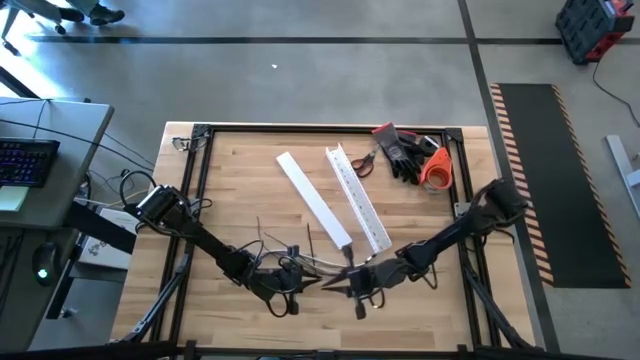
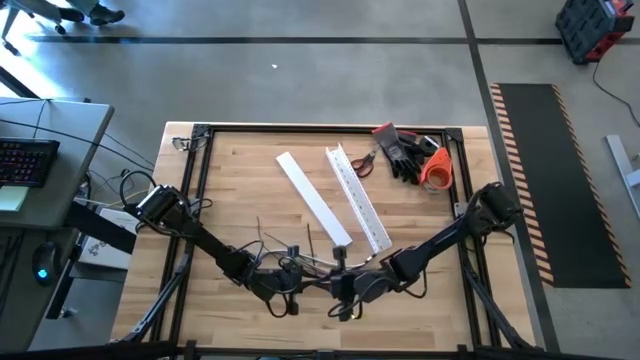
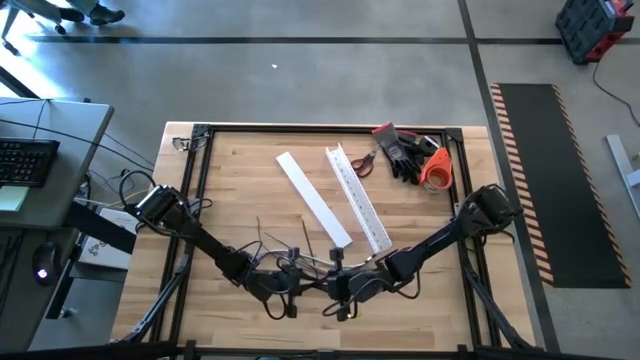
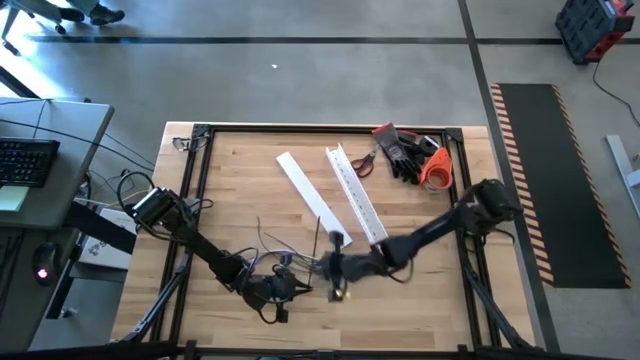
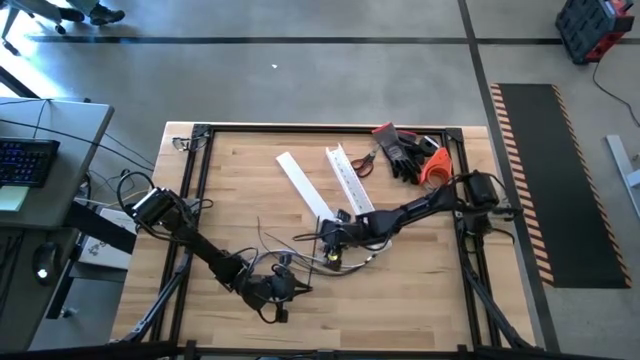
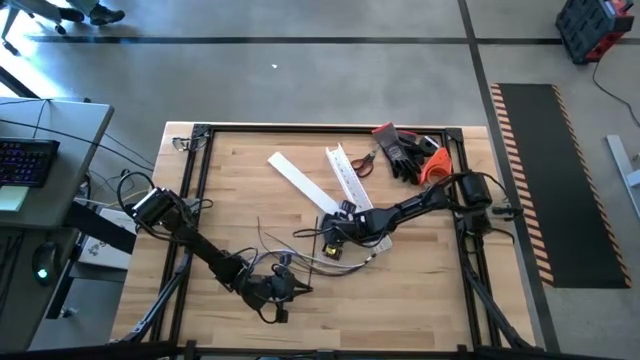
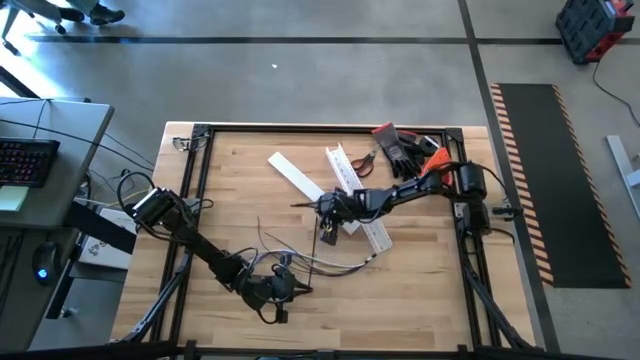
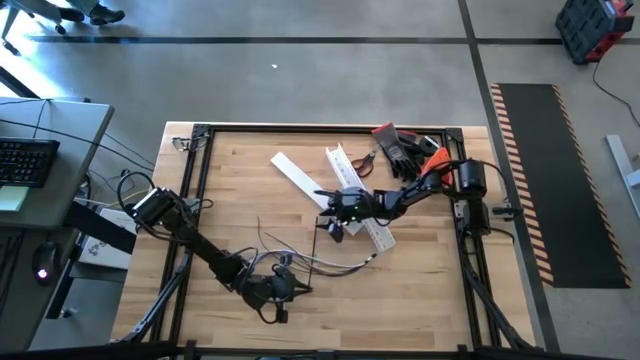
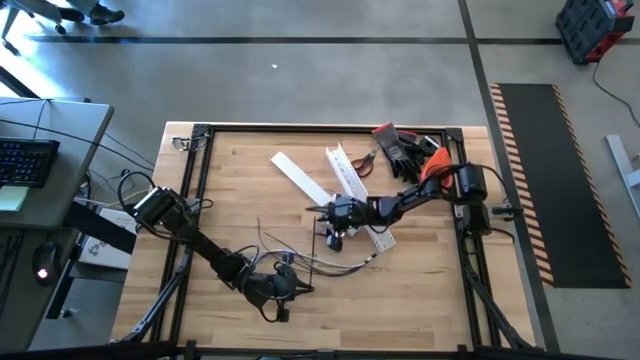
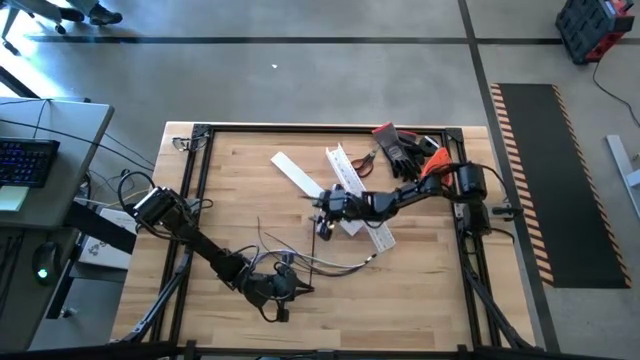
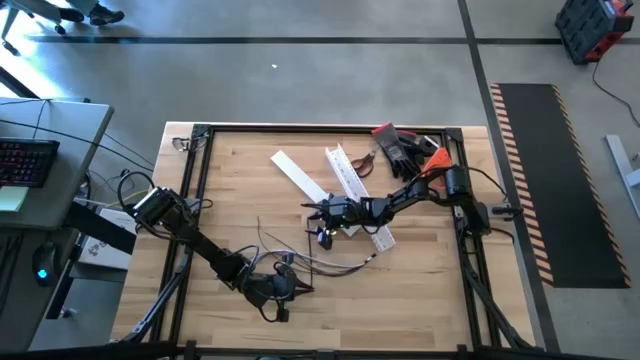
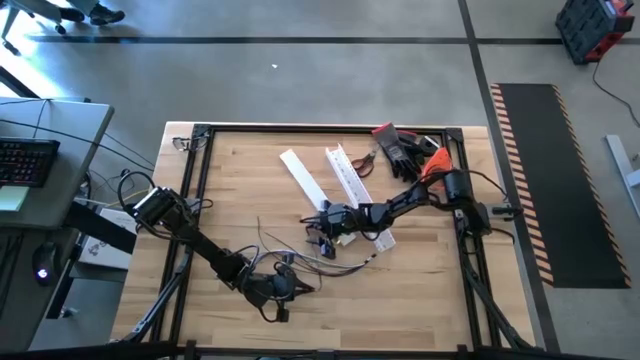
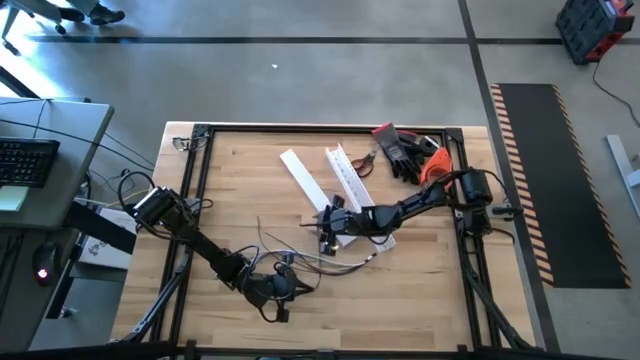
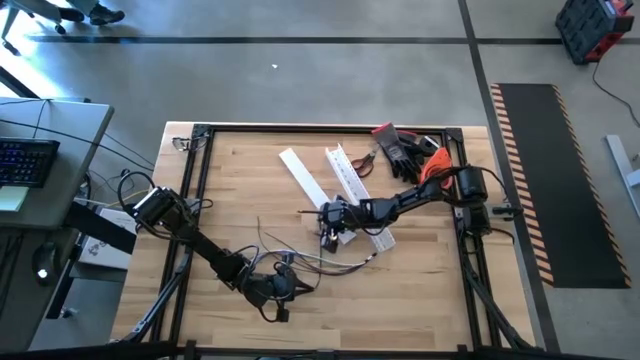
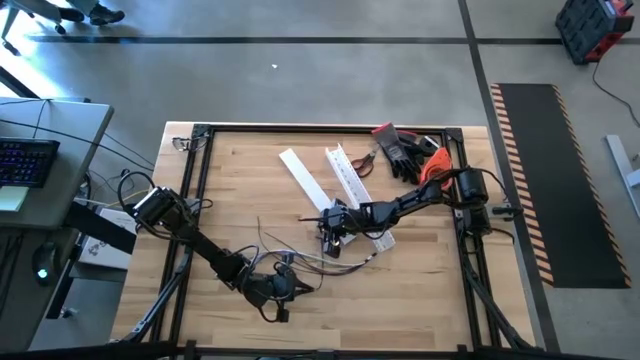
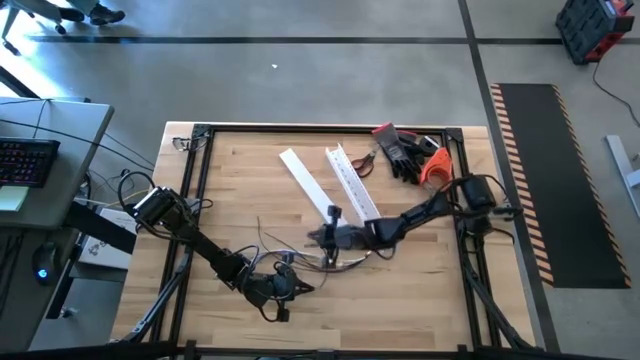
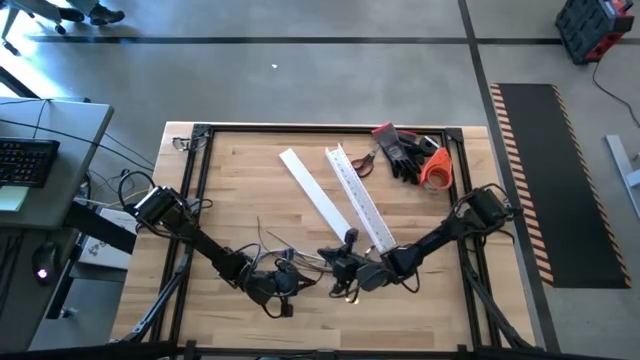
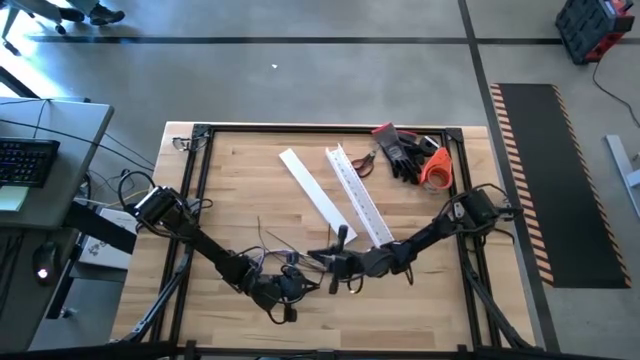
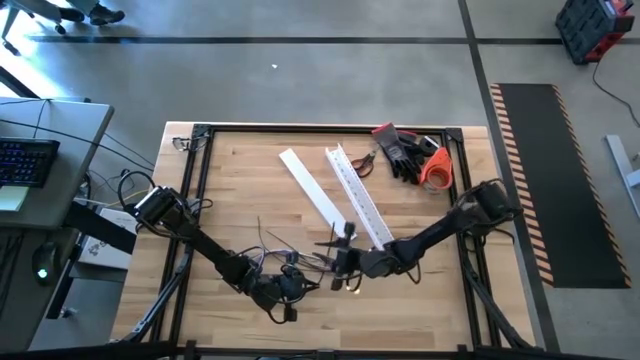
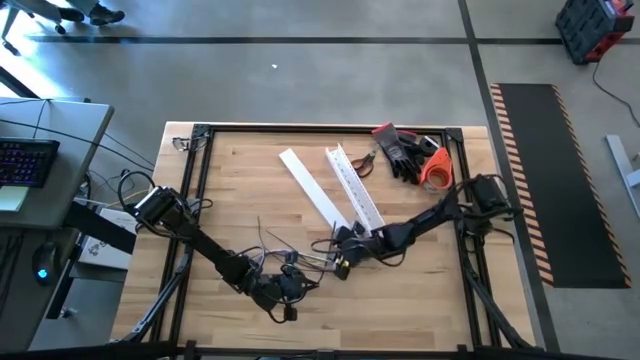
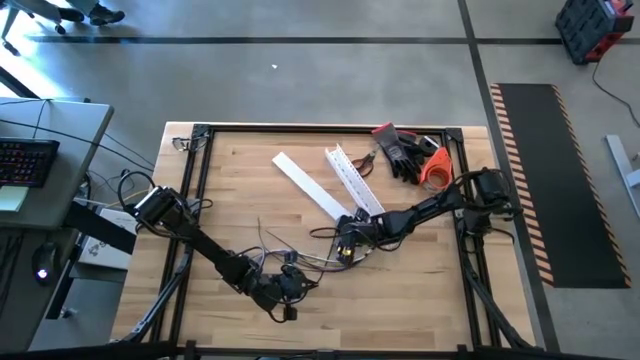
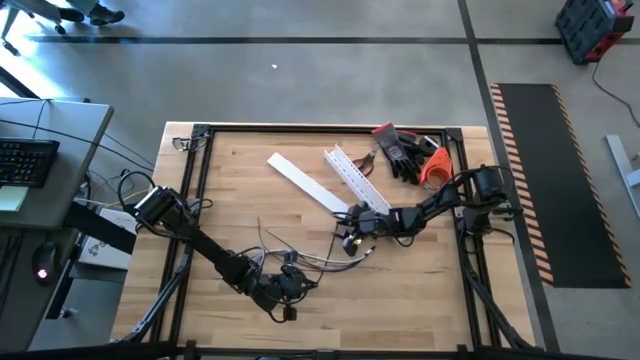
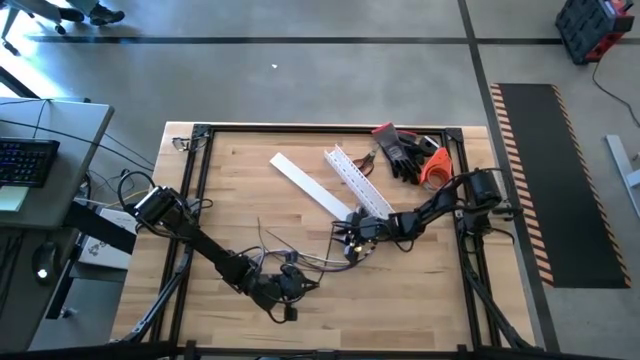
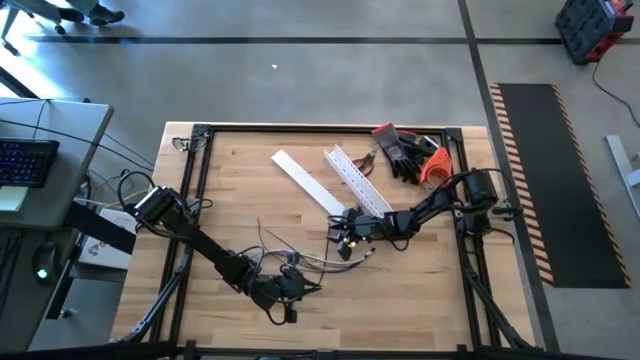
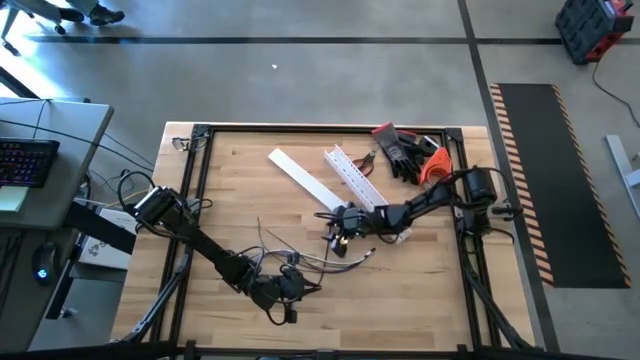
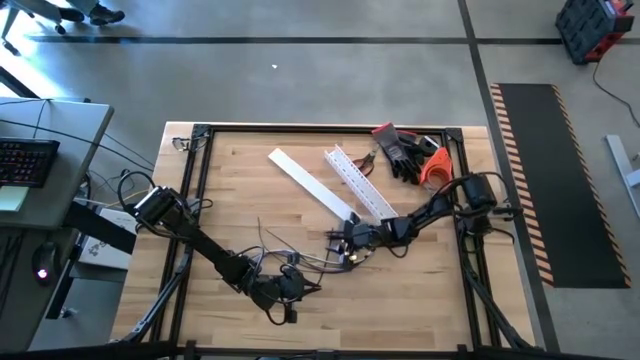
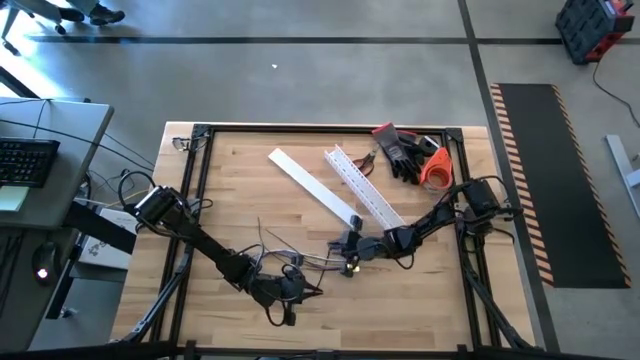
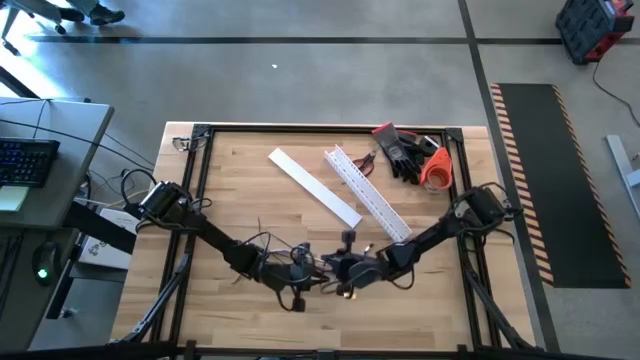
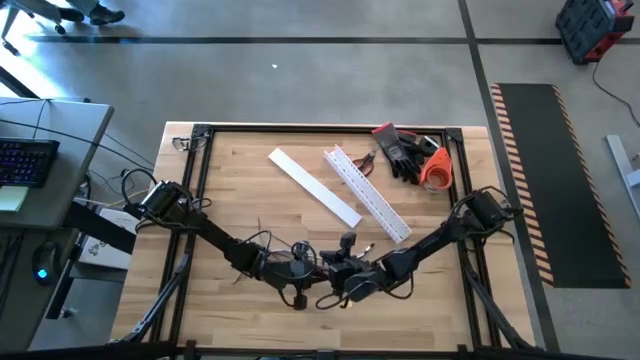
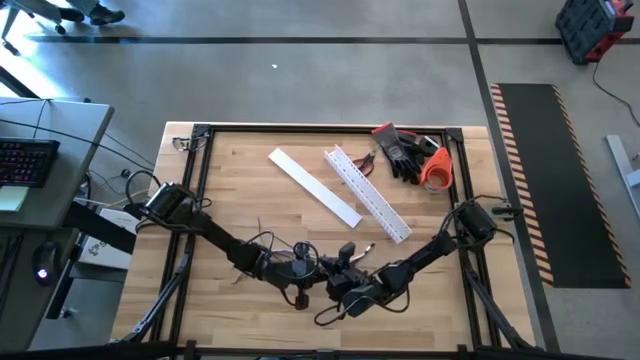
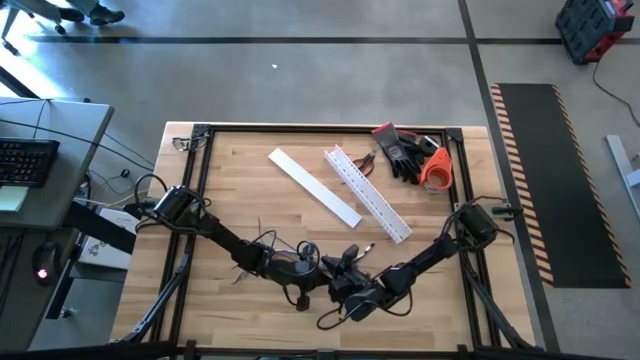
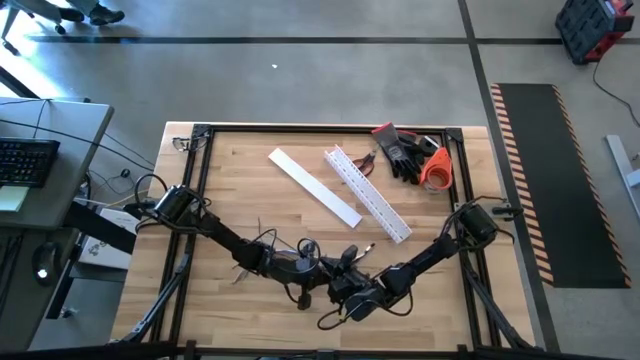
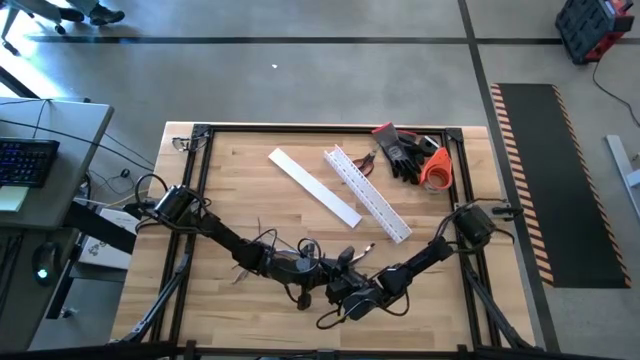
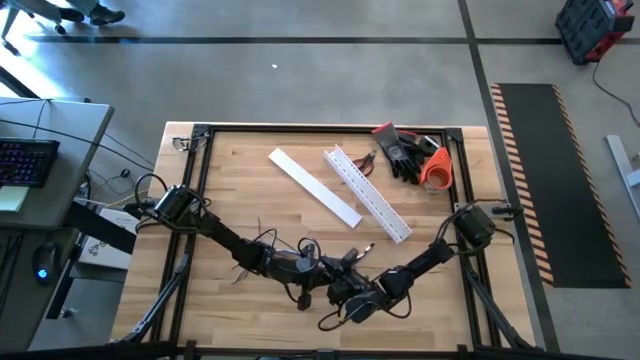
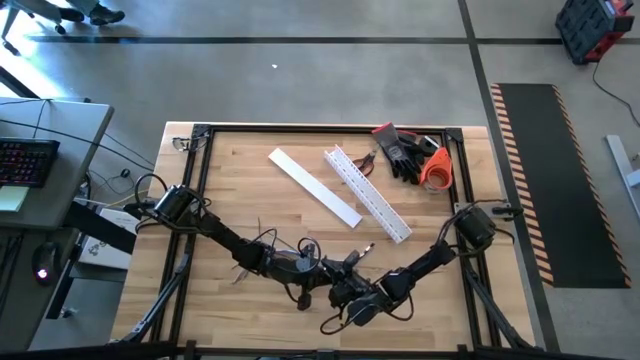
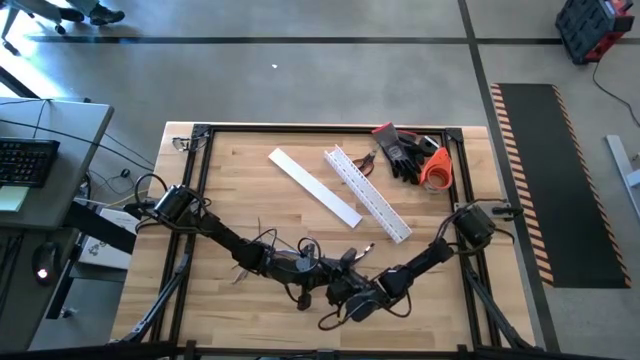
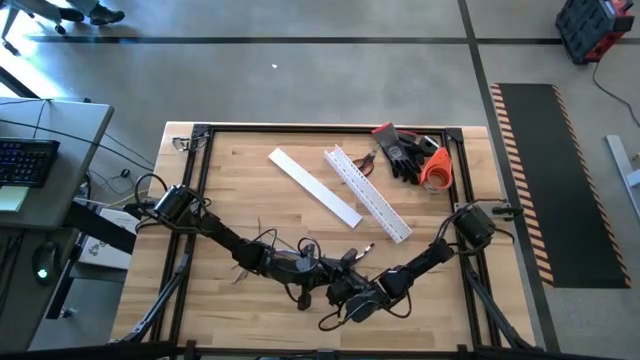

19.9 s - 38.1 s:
Task: Ziptie cables
Wrap the colored cables with the black zip tie

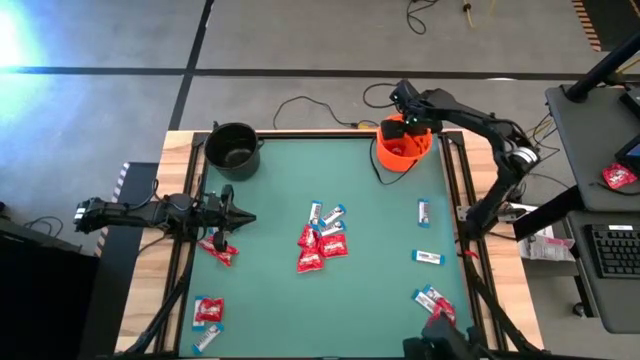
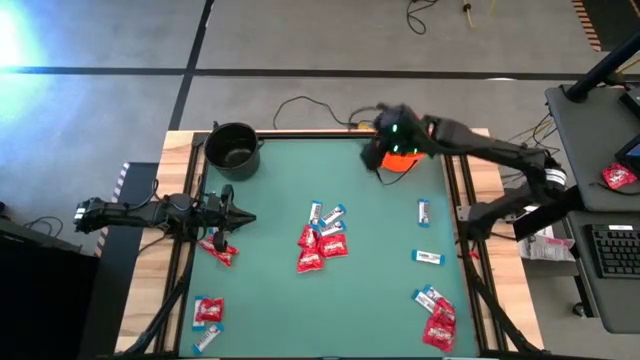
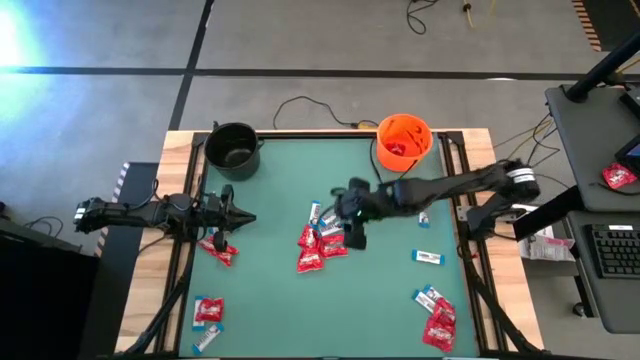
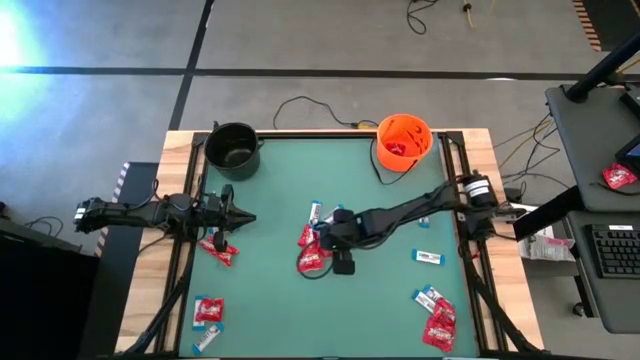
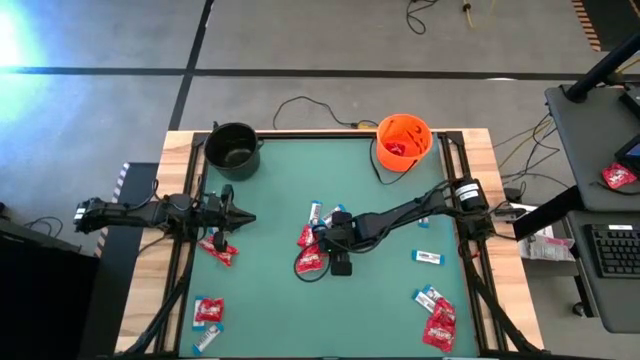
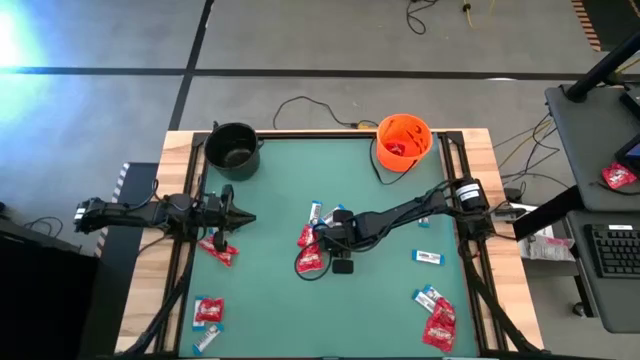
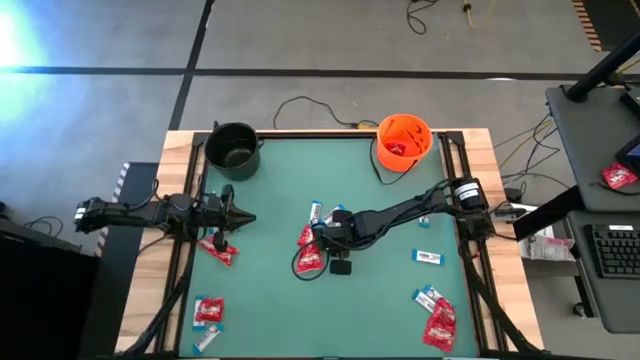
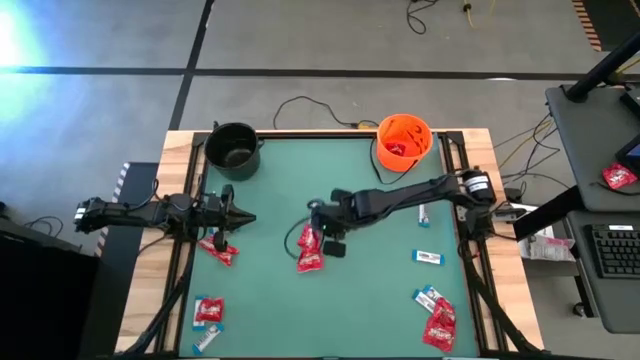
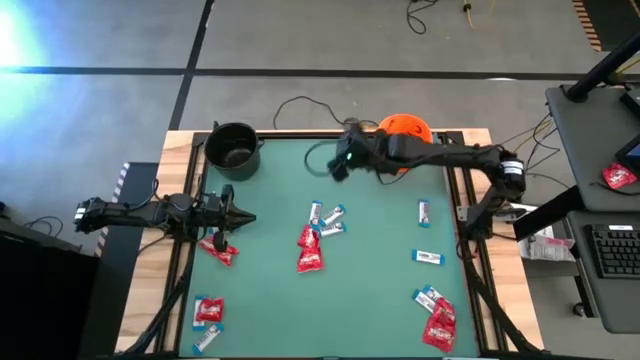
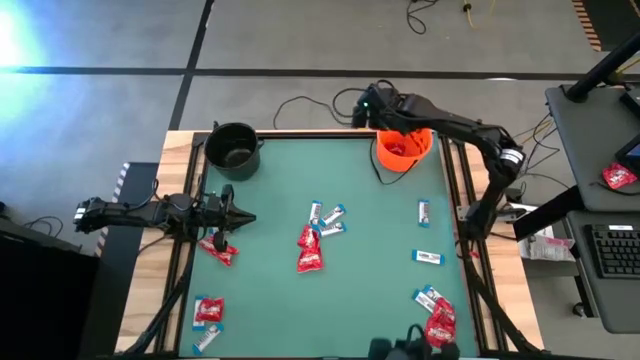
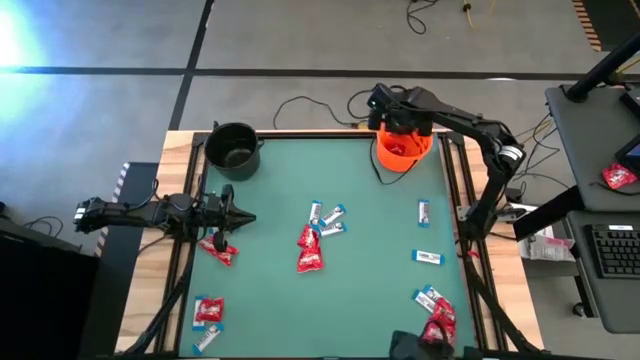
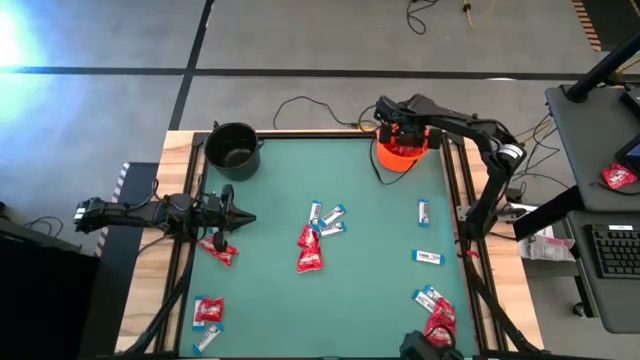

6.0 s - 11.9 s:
Task: Sort candy by brand, put in halloween buckets
Put the red candy into the orange bucket
